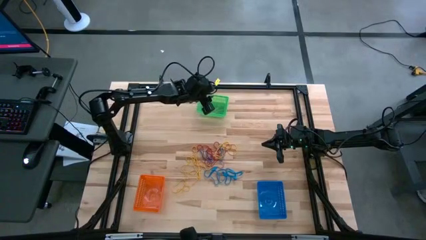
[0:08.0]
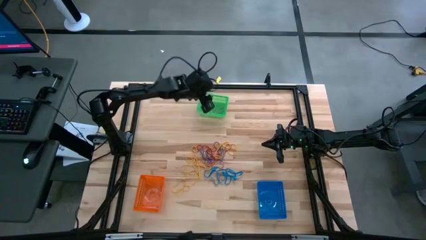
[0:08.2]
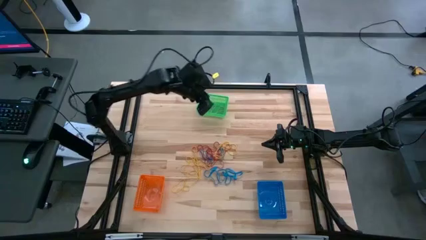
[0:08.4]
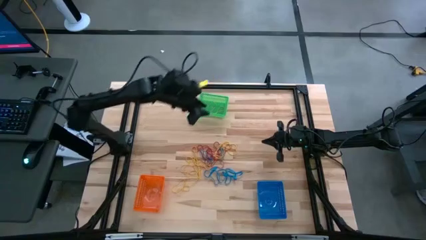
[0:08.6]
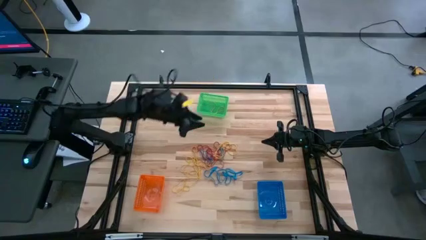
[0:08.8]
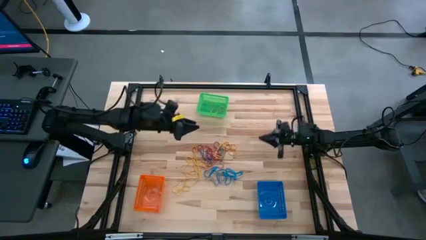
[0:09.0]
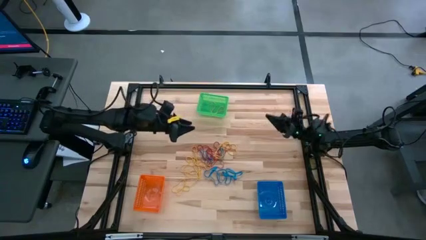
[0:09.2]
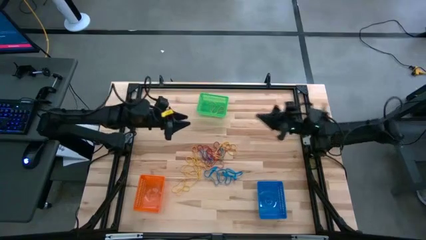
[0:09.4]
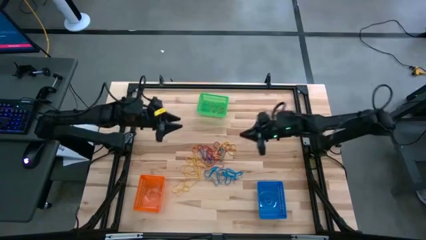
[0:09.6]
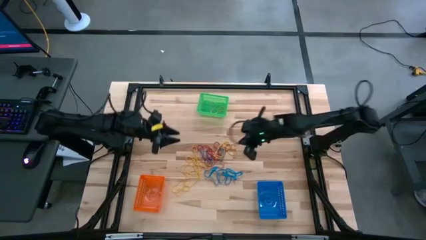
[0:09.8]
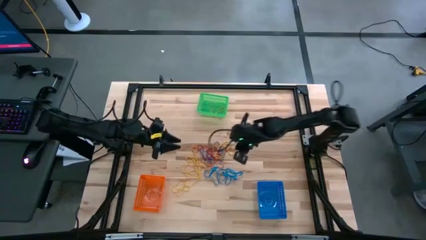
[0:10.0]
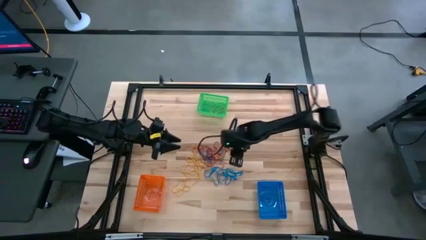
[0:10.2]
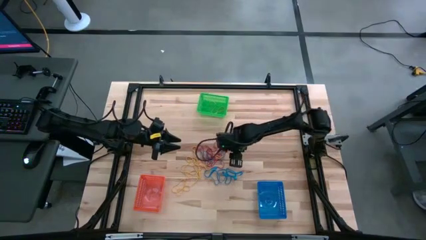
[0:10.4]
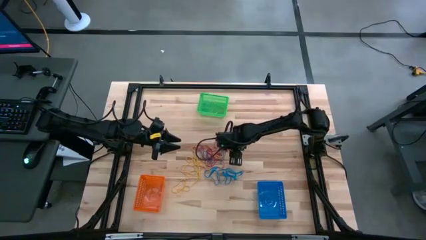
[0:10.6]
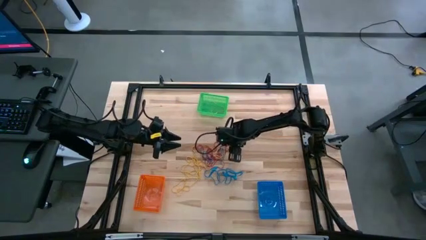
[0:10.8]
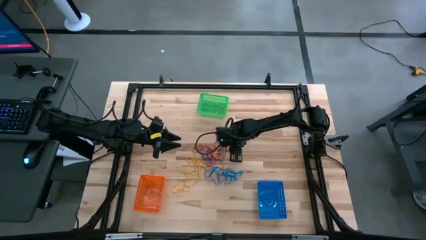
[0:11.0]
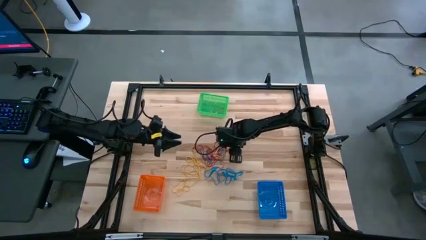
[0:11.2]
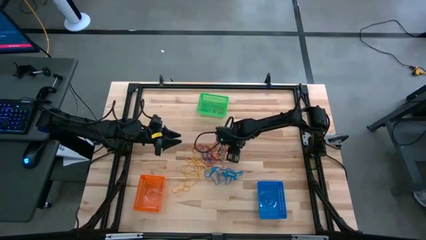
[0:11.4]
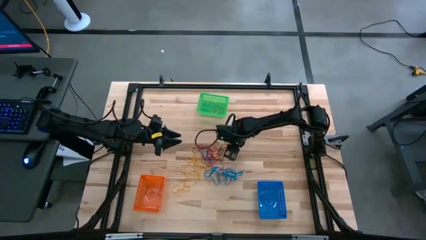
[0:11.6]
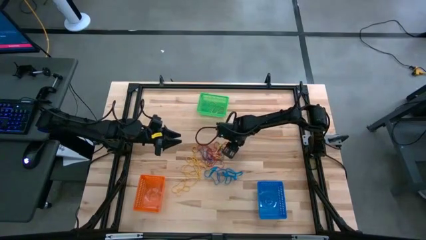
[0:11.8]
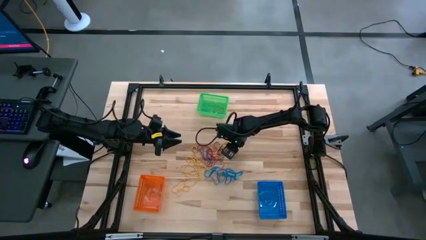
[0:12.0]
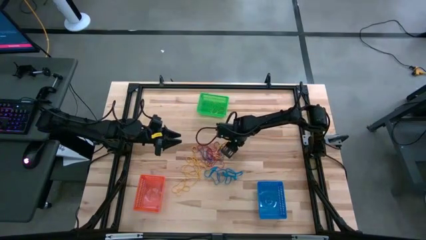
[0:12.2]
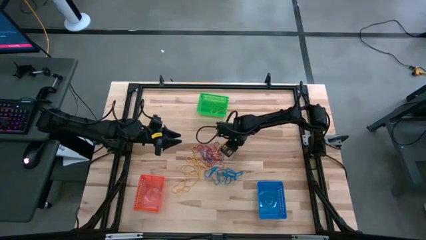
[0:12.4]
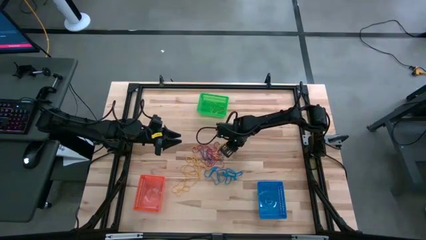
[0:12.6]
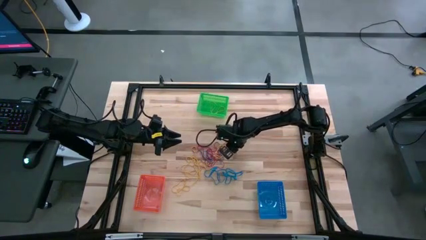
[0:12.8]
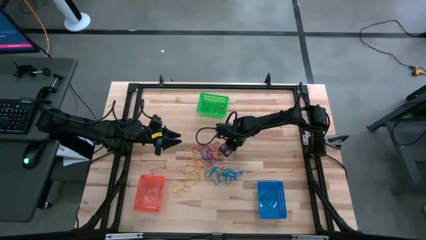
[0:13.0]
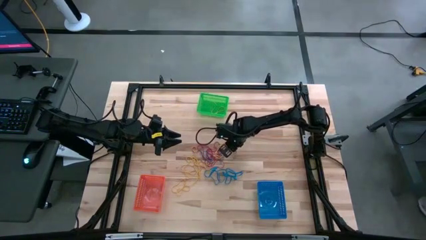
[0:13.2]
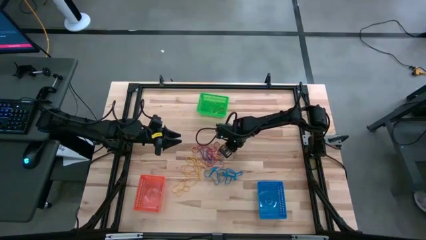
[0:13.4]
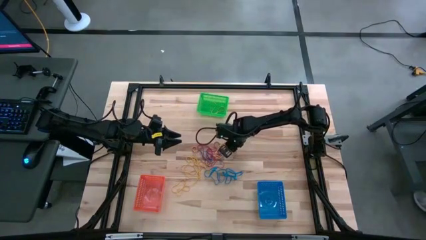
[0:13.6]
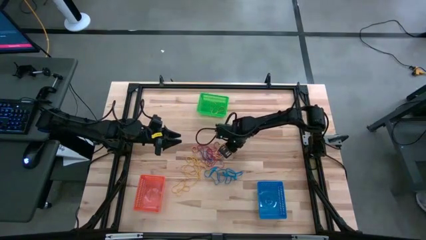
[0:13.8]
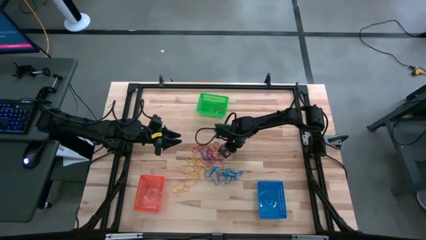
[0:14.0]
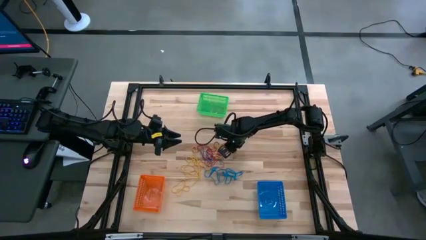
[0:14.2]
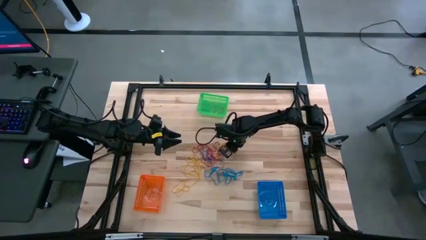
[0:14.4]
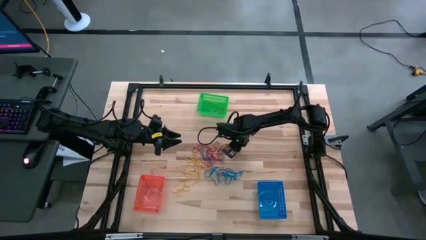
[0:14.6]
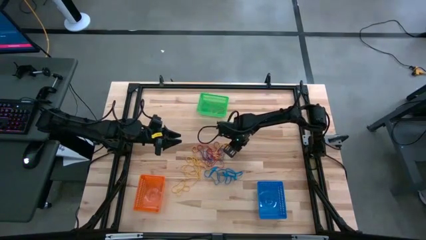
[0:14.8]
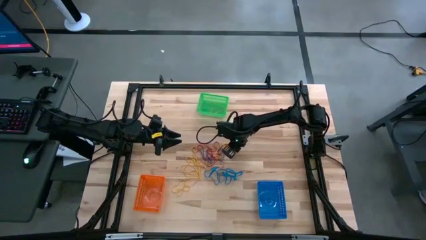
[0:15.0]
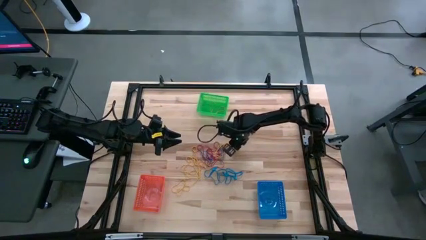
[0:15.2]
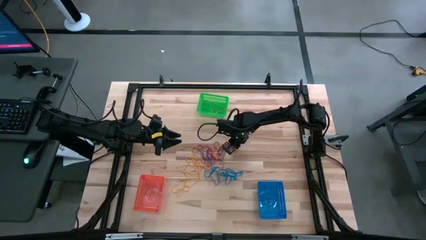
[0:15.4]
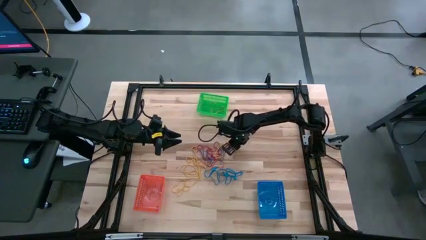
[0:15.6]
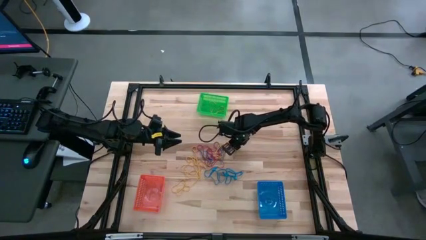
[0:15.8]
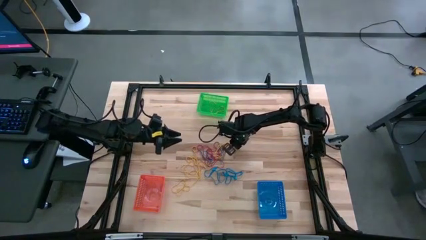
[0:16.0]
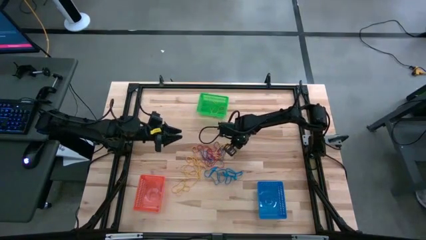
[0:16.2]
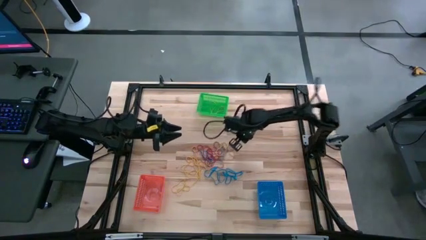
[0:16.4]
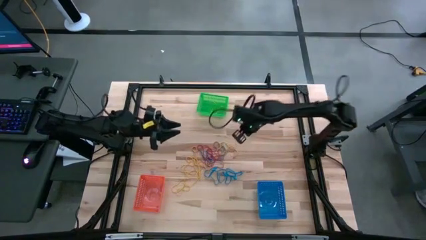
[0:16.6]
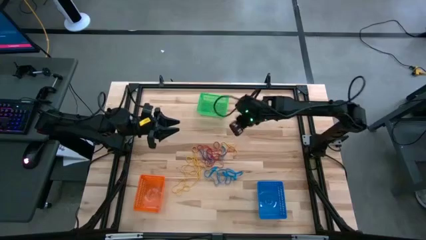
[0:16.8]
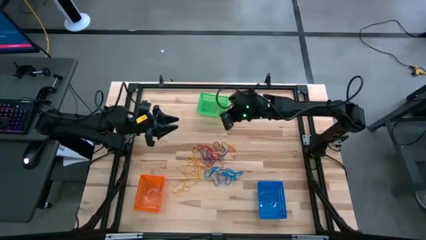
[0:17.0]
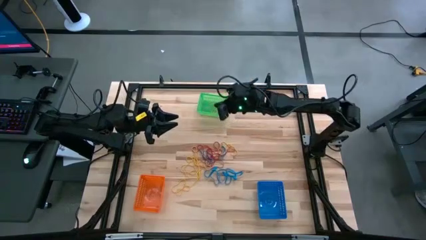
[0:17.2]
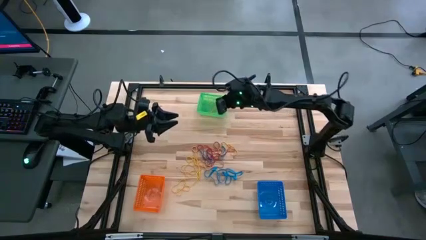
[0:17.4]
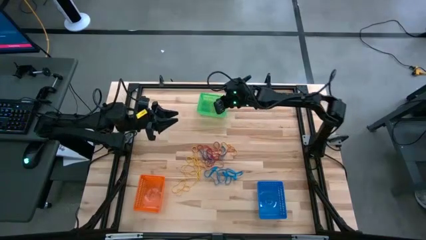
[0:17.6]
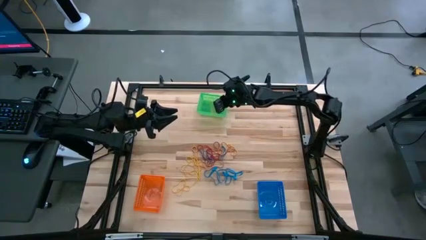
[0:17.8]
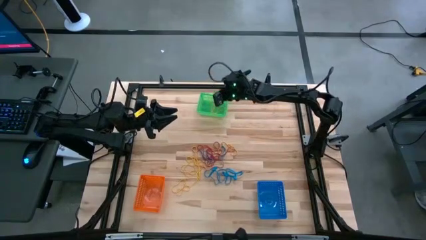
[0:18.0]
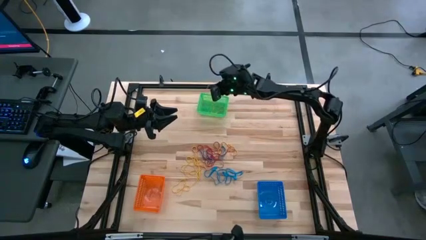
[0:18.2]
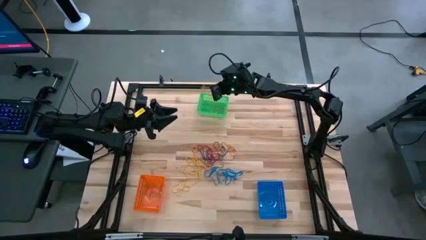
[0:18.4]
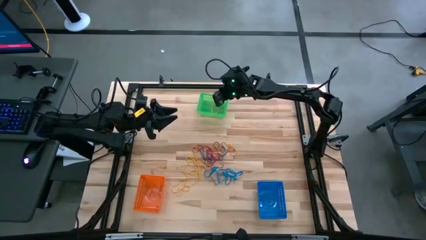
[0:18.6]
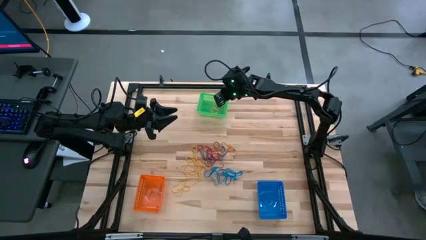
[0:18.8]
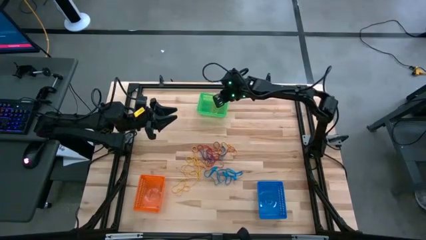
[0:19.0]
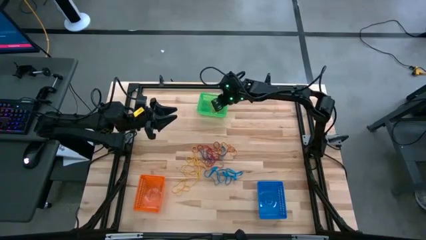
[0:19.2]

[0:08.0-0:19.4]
Task: Sort rubber bands into baskets
Put the yellow rubber band into the green bin

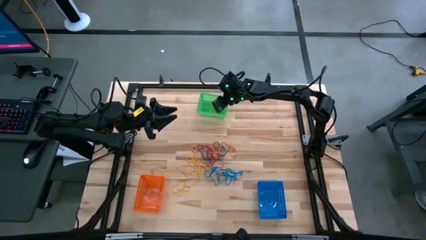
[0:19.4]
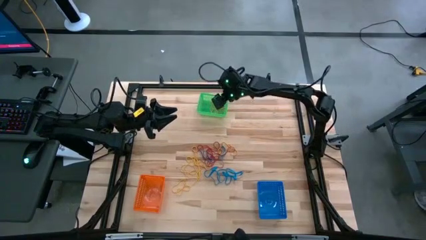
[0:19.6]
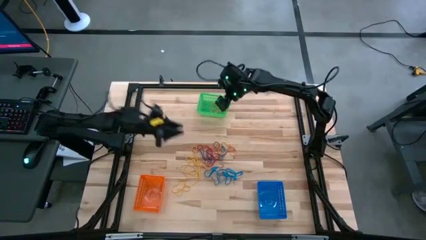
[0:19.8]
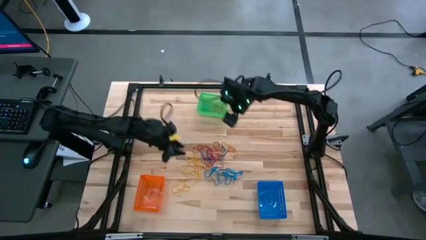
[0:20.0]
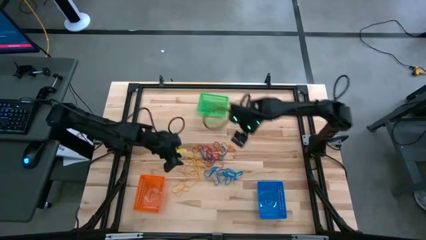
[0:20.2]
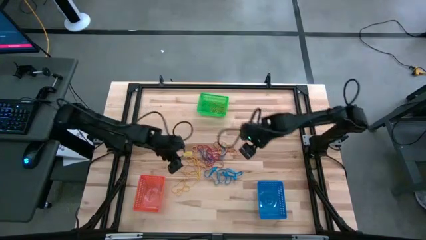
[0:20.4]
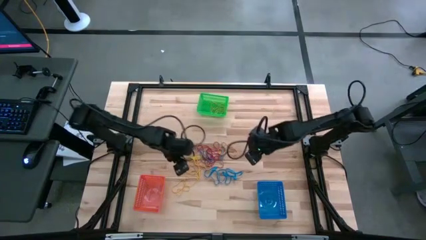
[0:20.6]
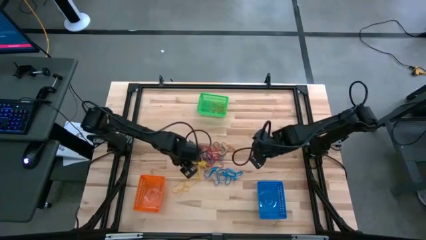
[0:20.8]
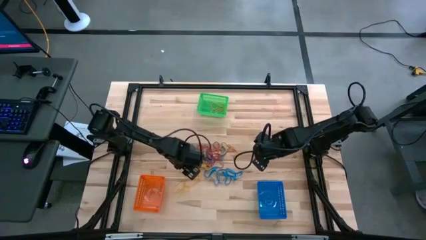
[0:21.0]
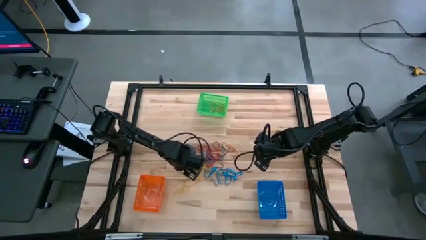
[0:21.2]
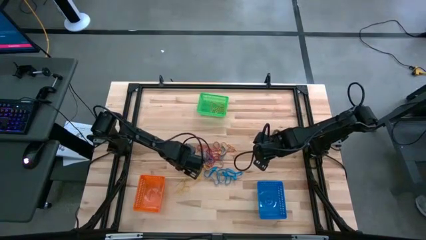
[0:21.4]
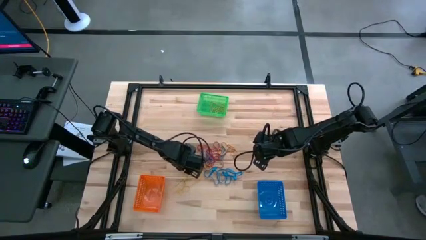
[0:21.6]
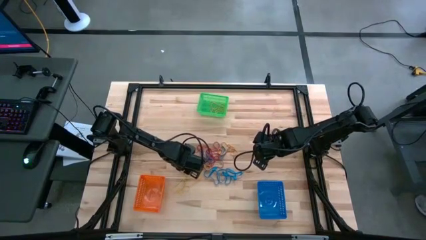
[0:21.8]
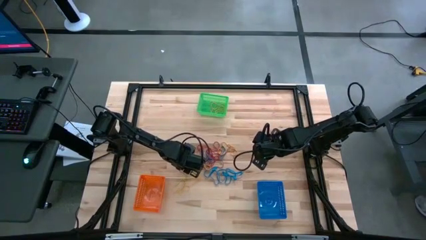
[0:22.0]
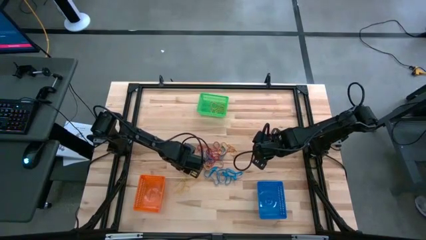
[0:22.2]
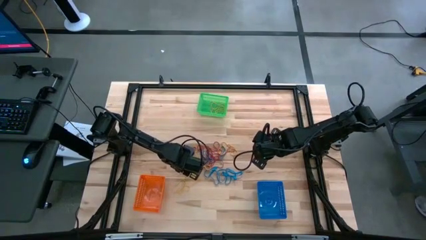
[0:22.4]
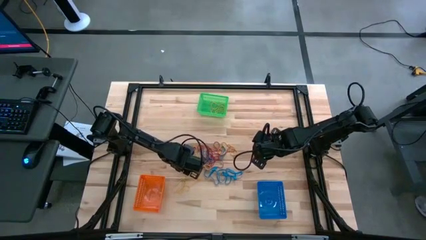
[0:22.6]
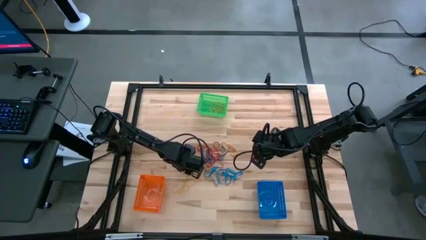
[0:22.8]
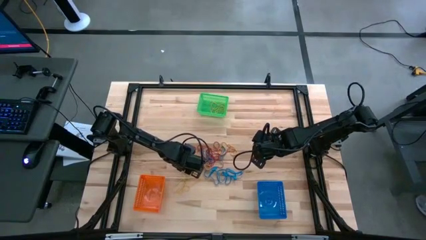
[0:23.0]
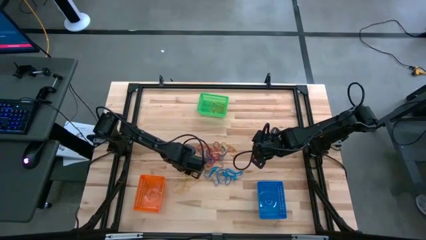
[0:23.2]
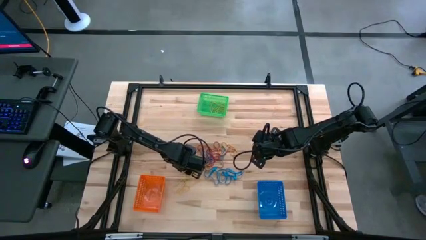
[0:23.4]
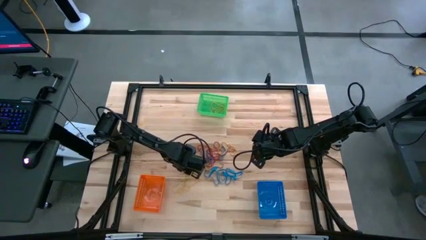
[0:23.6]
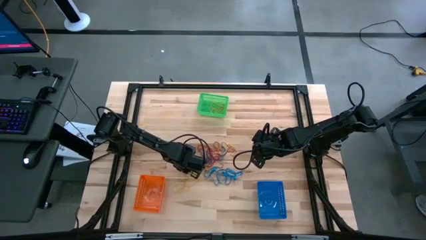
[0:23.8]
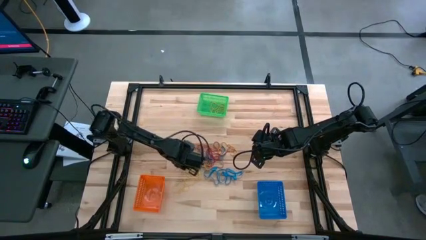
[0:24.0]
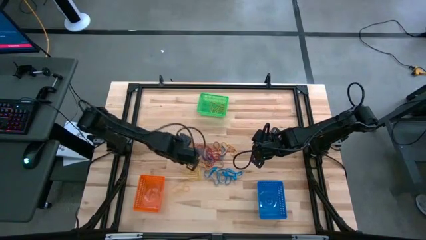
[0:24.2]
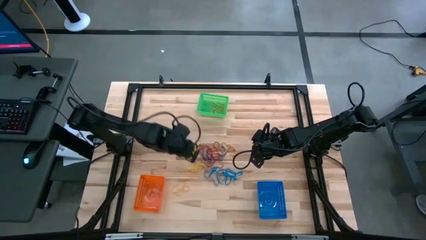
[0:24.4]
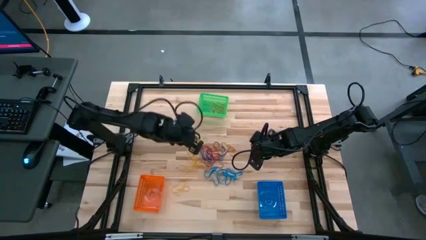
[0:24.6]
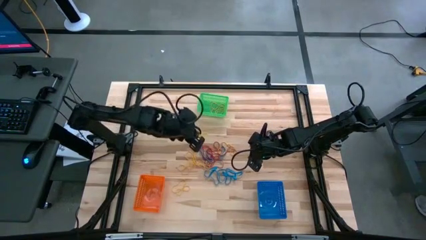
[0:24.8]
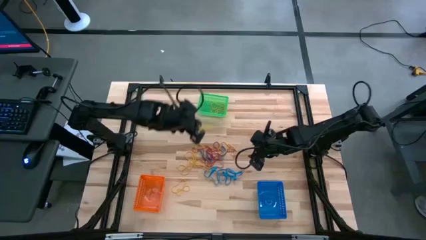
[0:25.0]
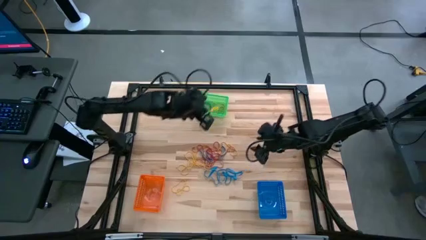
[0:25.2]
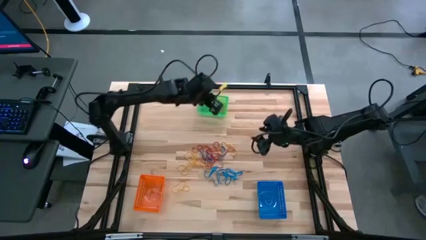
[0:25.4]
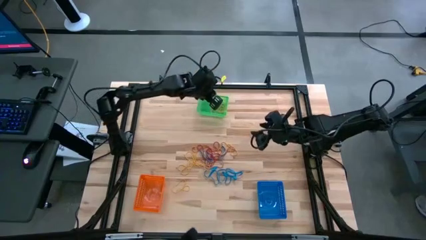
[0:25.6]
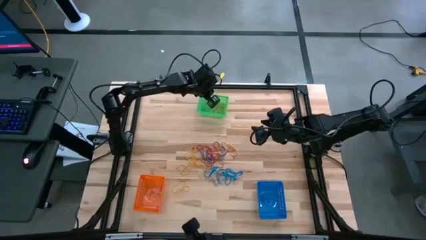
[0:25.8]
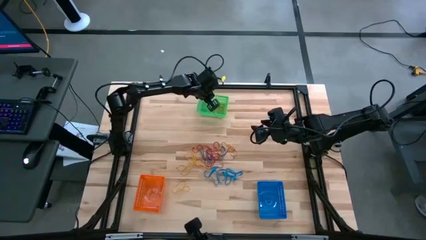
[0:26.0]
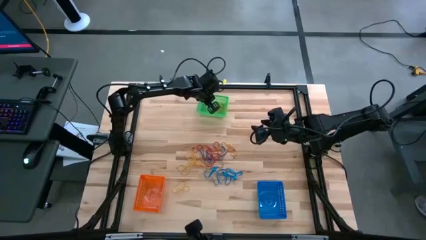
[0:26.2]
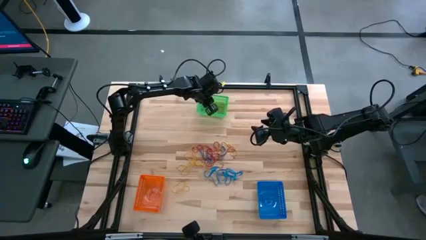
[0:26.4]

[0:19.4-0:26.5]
Put the yellow rubber band into the green bin
